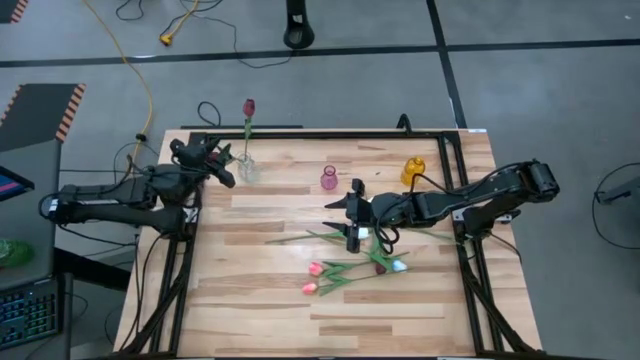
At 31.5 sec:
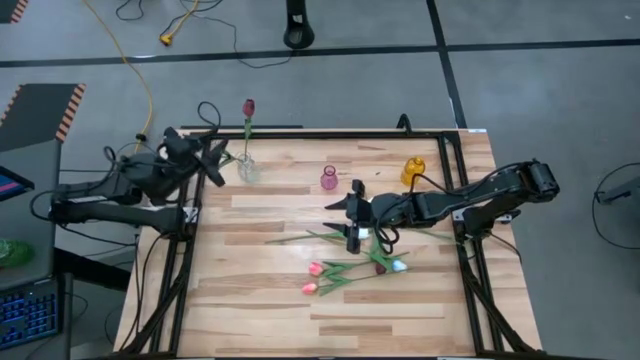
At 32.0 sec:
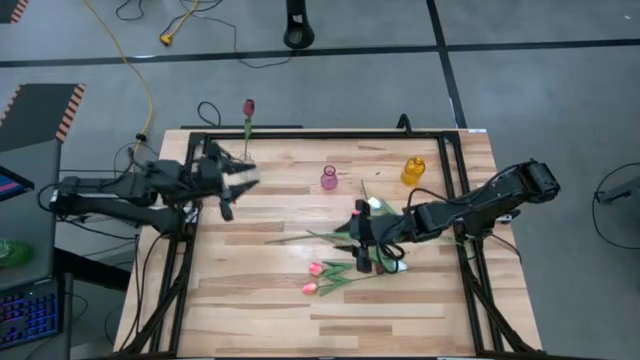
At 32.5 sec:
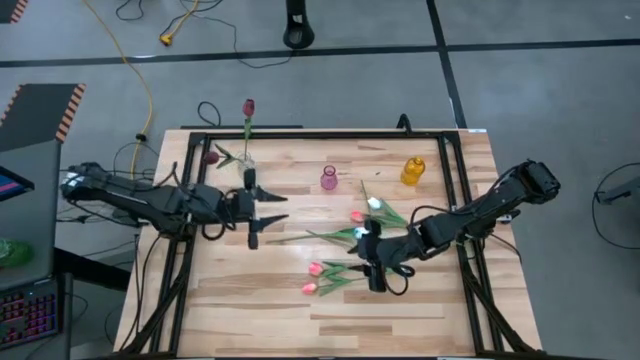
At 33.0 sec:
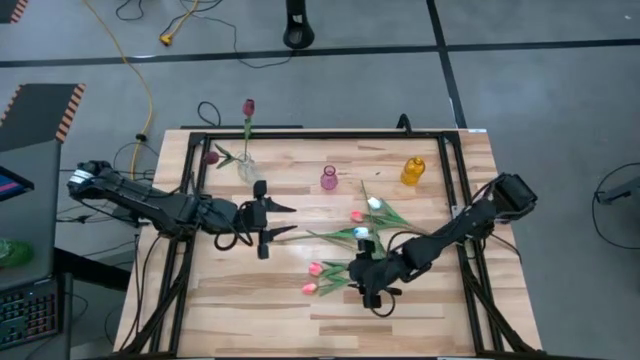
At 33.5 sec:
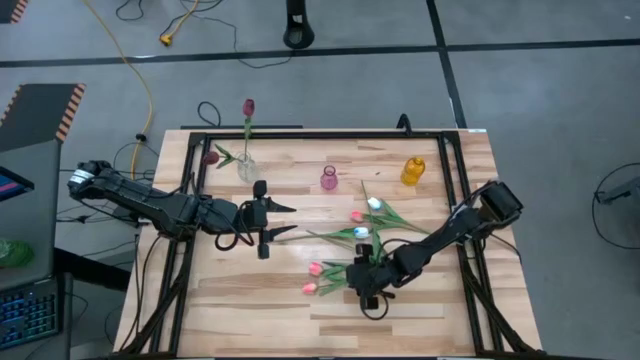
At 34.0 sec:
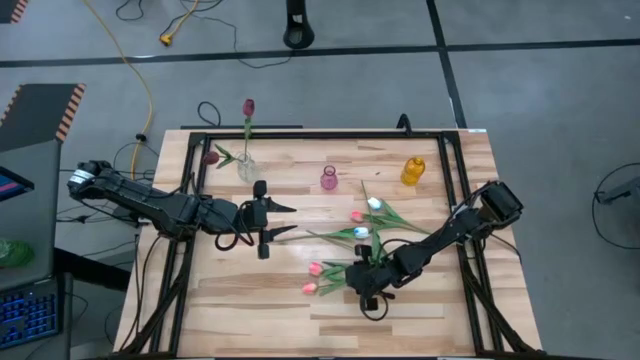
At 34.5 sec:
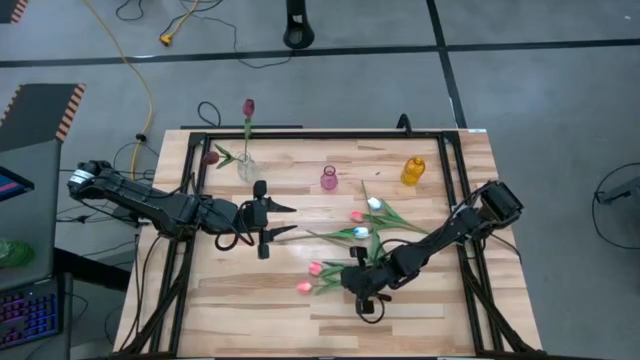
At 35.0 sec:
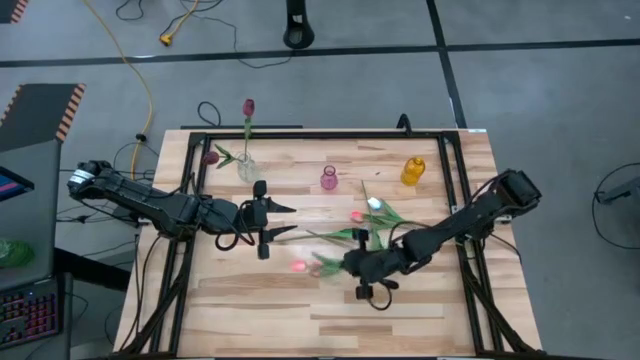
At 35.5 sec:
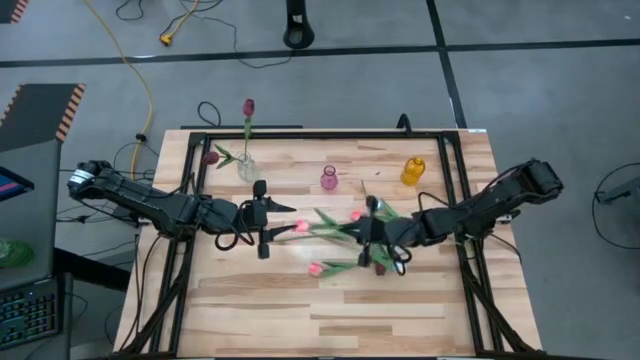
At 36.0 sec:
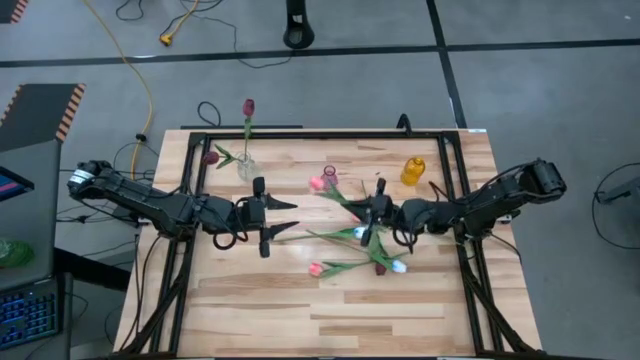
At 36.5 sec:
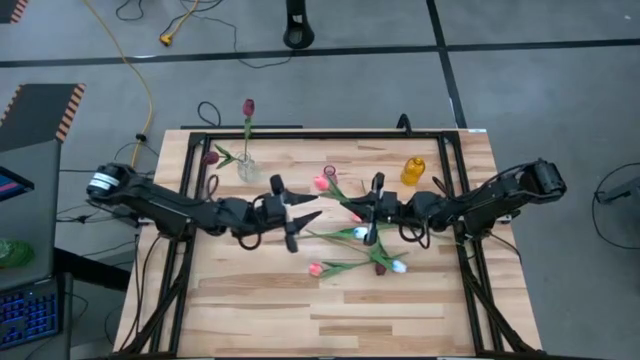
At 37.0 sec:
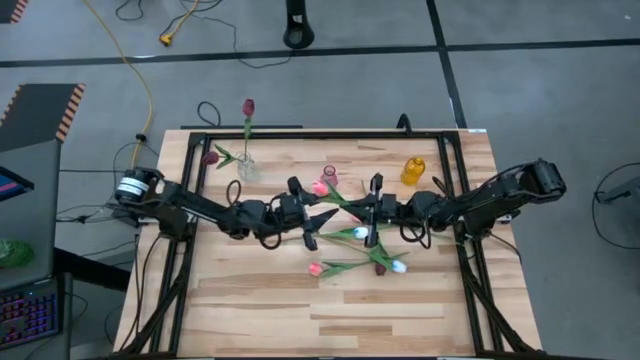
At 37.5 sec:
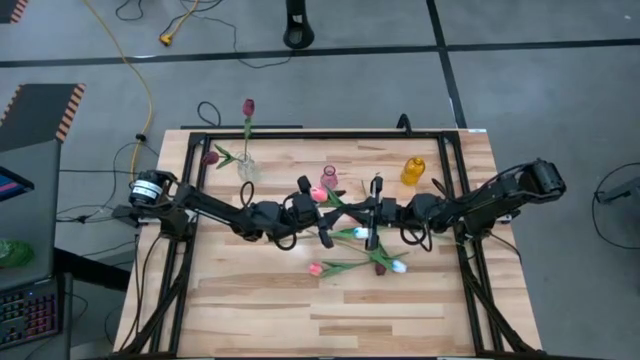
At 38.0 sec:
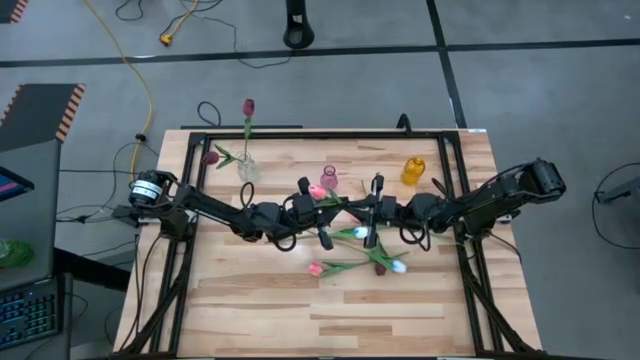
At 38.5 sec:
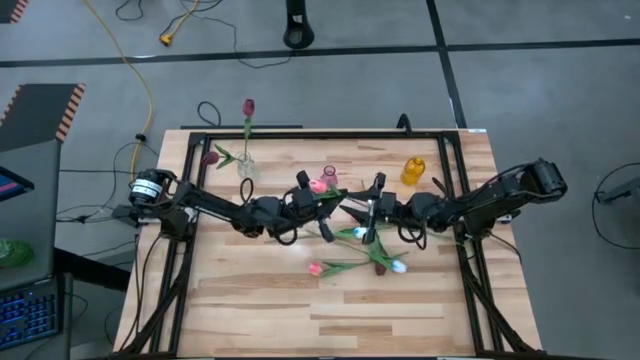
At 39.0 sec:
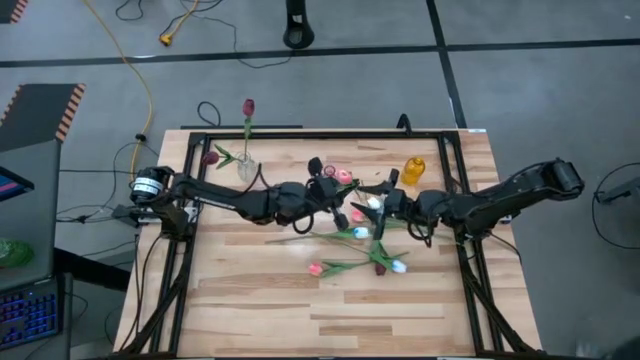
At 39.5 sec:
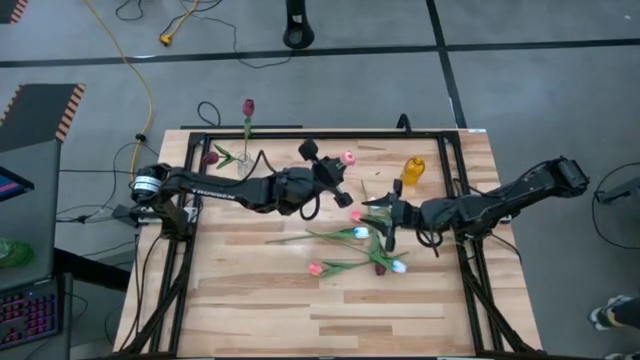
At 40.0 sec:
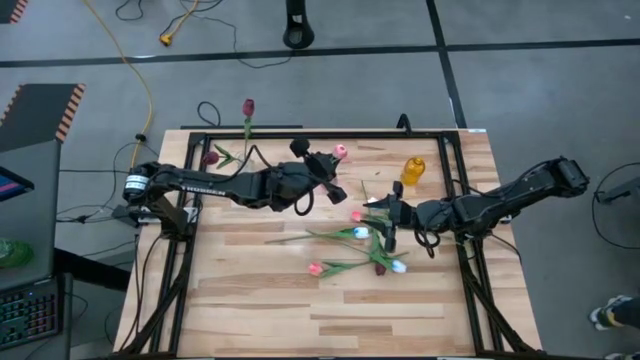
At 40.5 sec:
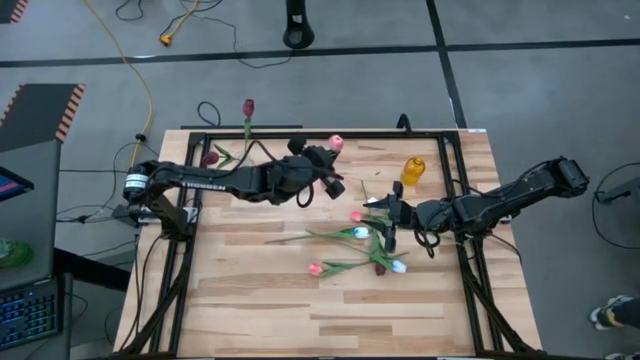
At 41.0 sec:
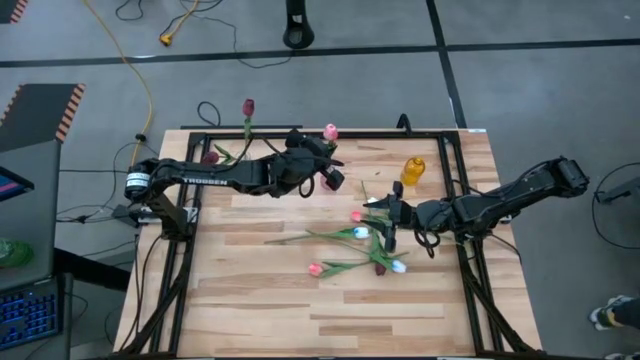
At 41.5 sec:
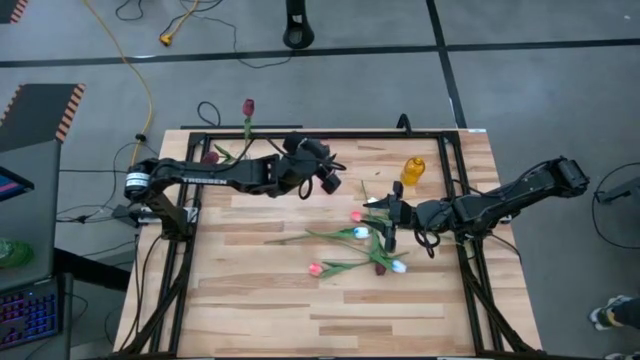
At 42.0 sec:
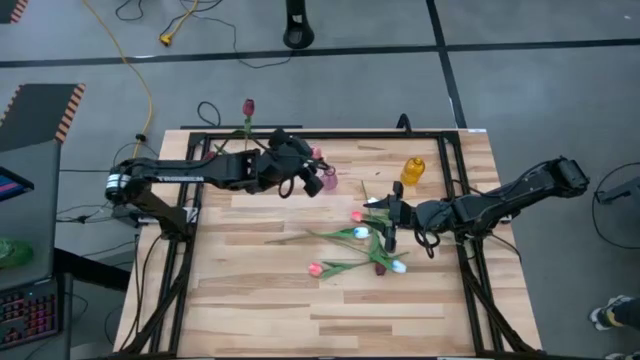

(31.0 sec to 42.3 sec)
Task: Sort flowers into vase by color
Put the bottom pink flower into the purple vase

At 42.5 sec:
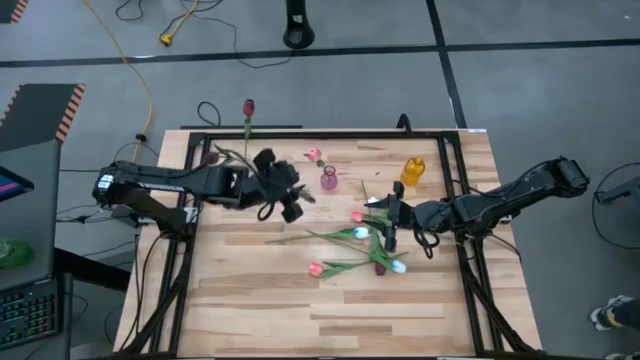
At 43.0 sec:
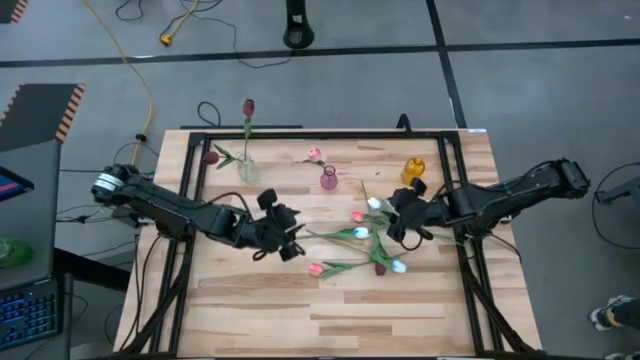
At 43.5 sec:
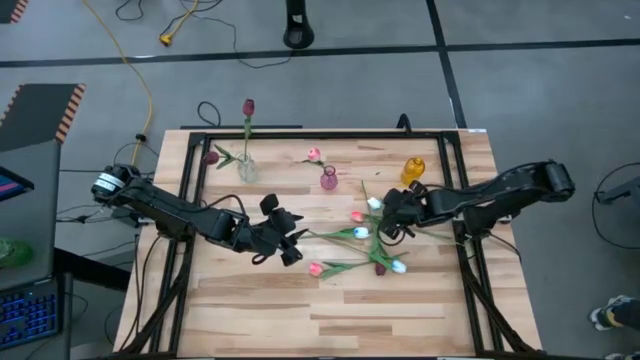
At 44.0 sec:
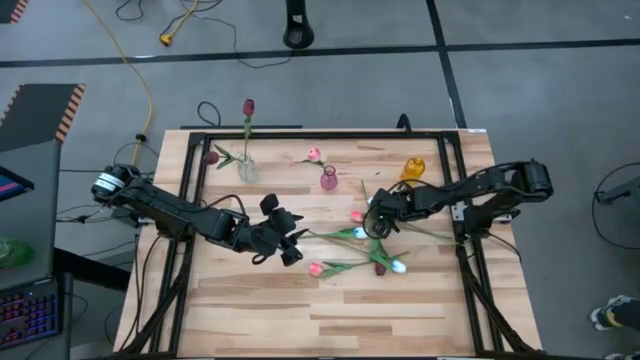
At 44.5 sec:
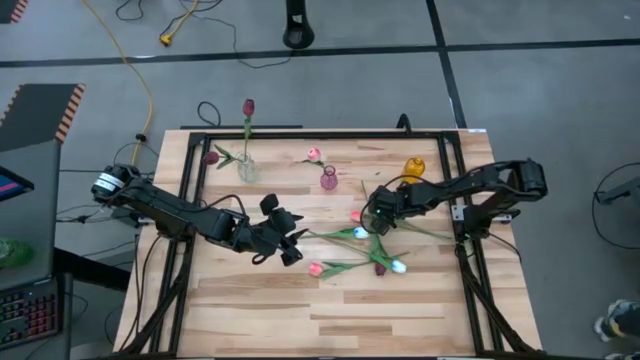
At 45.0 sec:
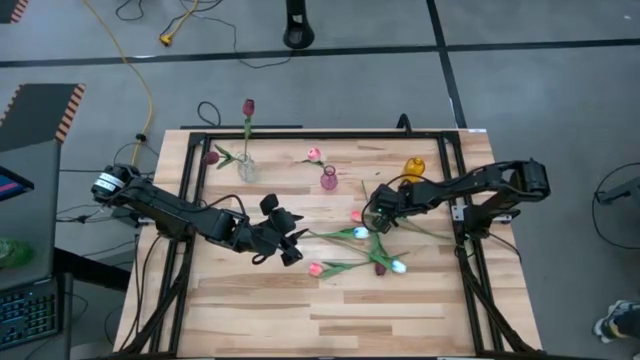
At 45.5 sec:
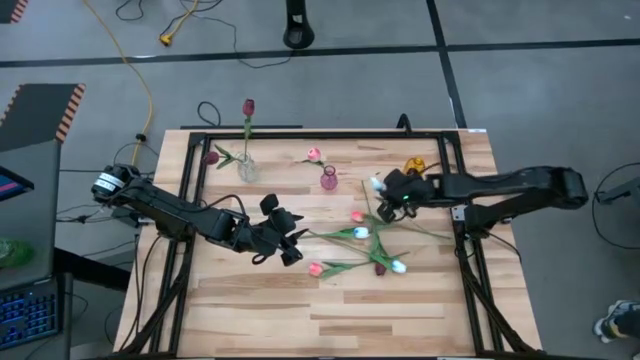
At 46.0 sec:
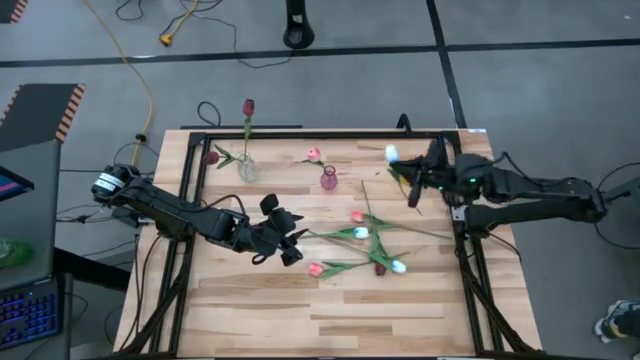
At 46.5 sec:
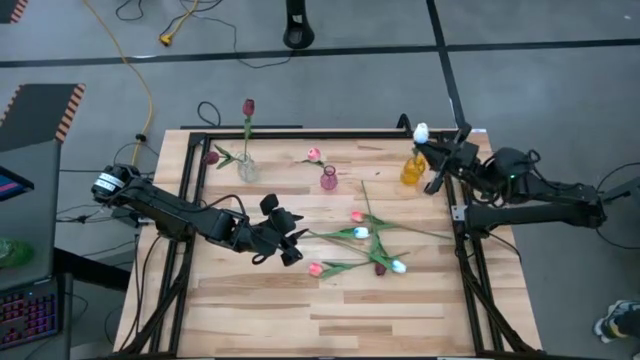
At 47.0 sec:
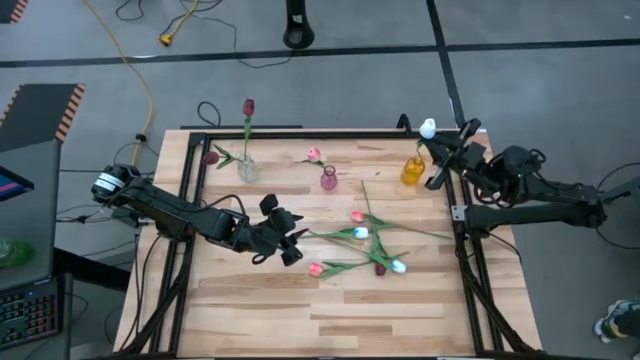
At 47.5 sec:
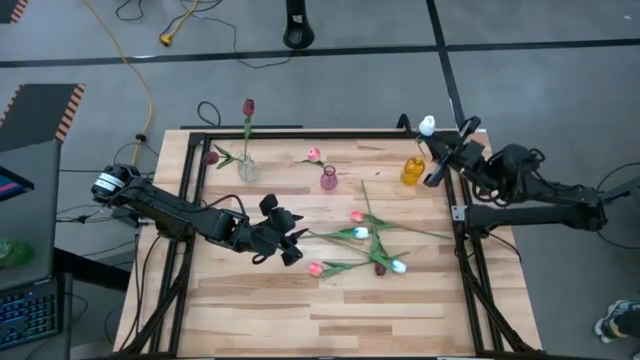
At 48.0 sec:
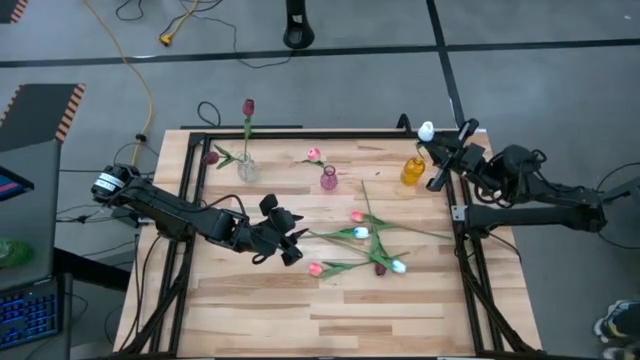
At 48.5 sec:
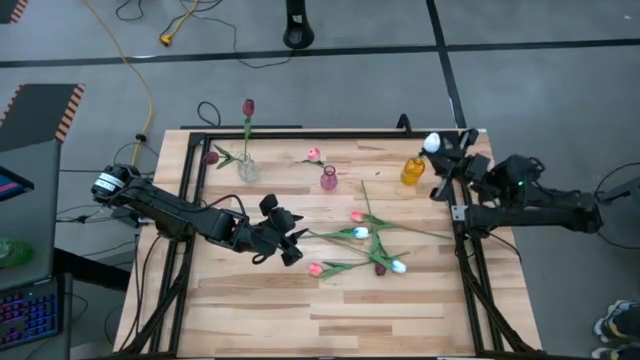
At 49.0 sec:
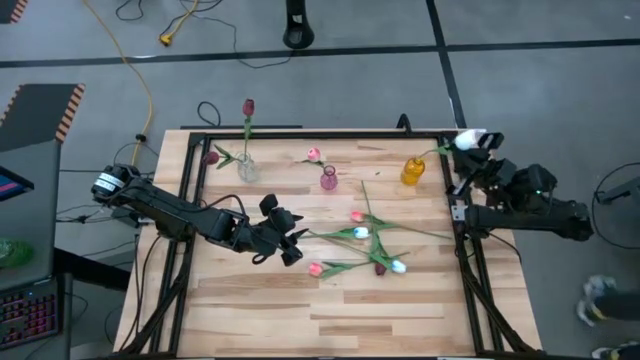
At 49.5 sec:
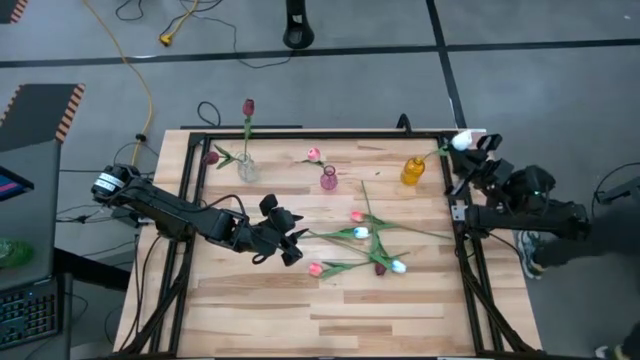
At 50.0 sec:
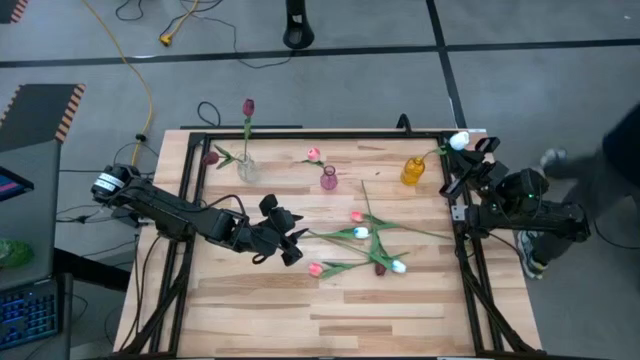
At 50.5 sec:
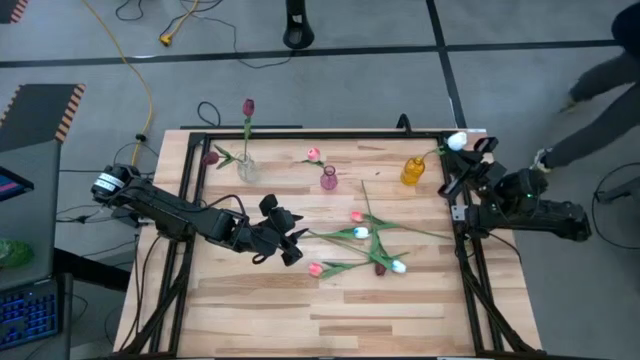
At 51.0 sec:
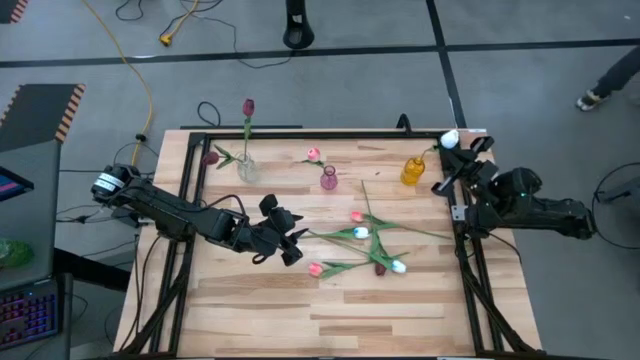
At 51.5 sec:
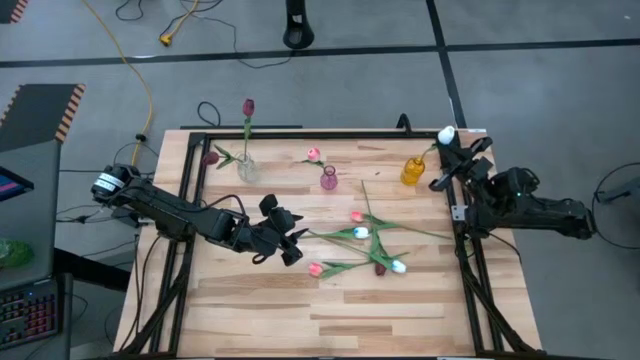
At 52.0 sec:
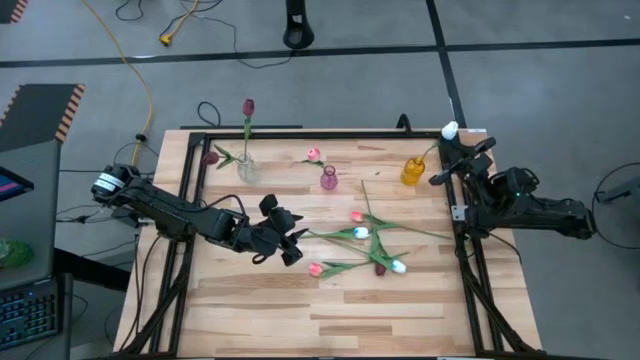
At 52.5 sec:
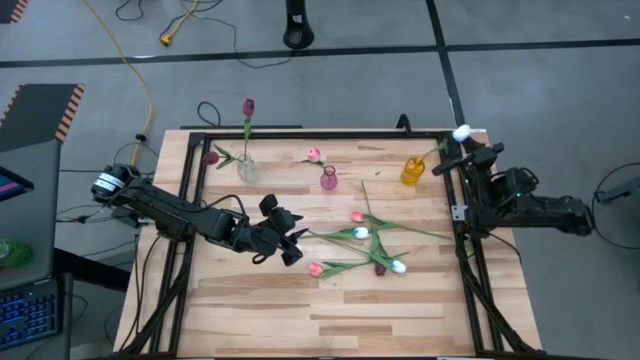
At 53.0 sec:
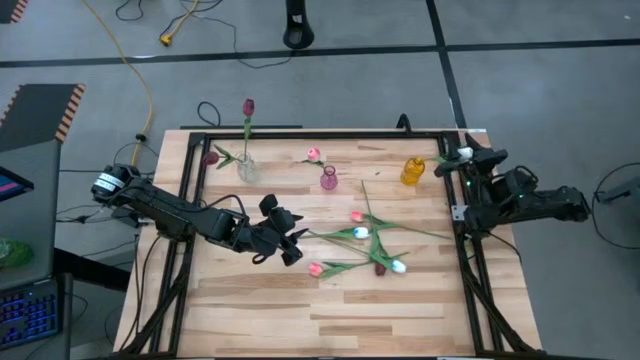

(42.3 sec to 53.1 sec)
Put the top white flower into the yellow vase
